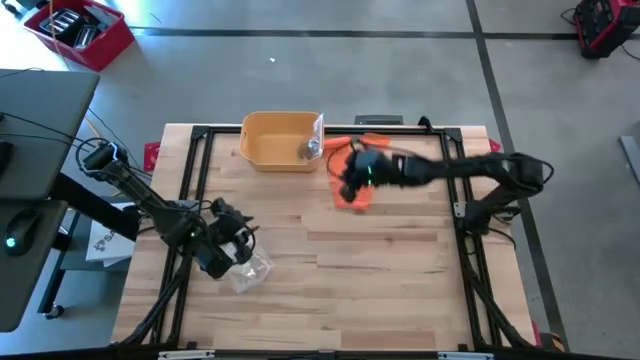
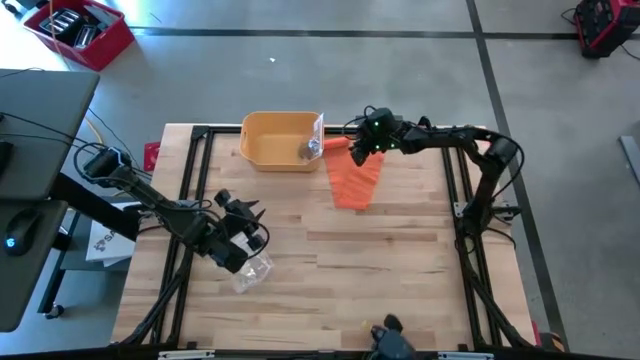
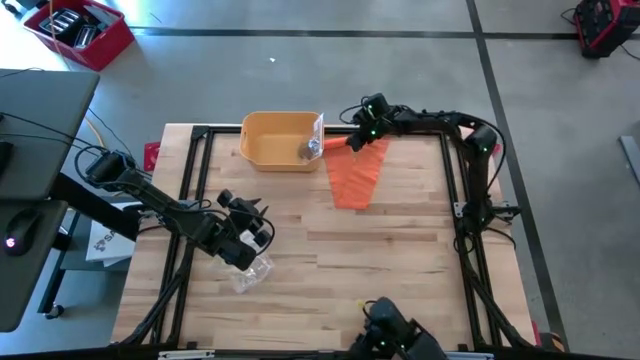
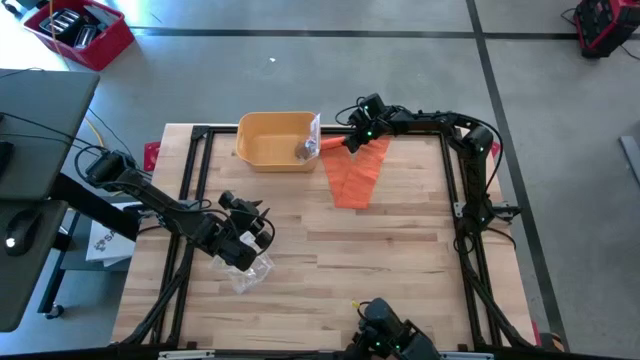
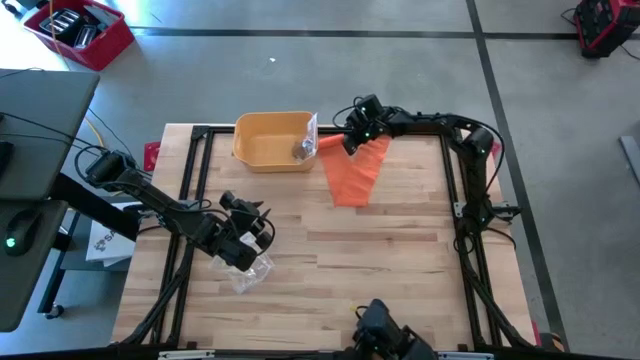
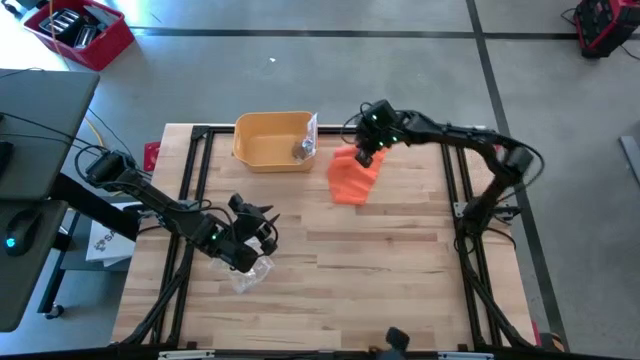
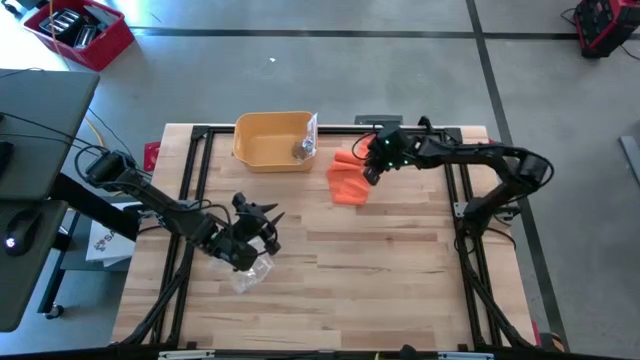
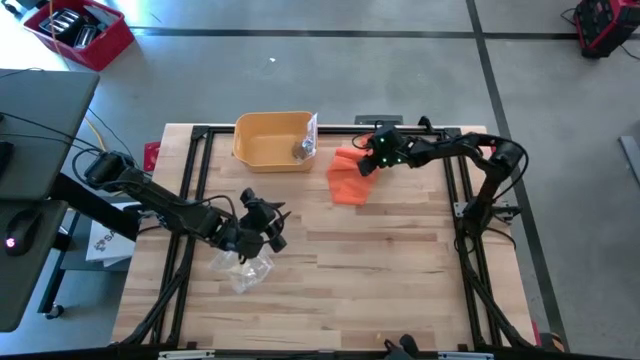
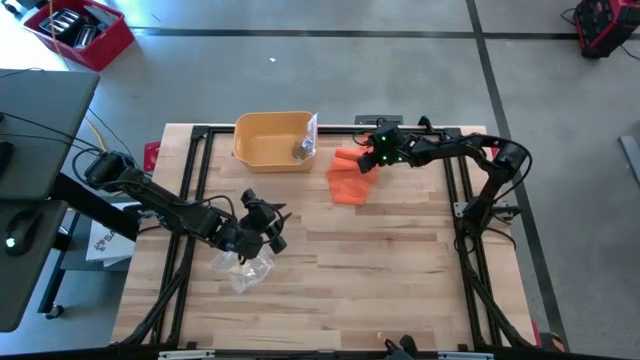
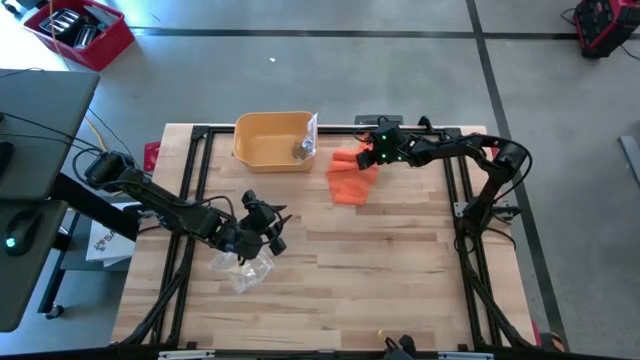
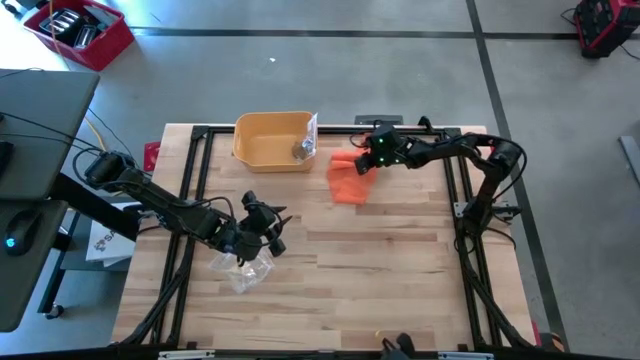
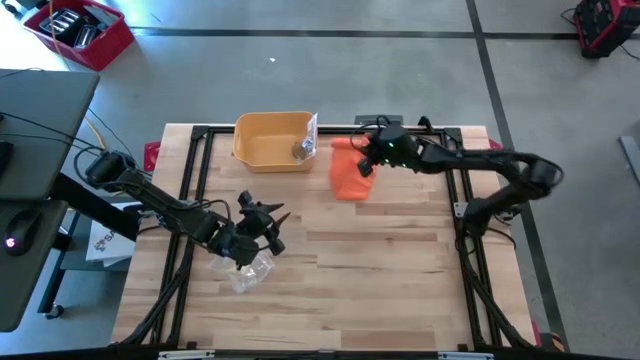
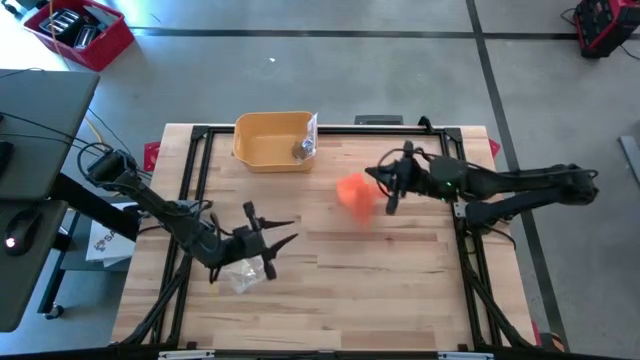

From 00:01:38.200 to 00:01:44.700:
Task: Roll bandage
Roll the orange bandage

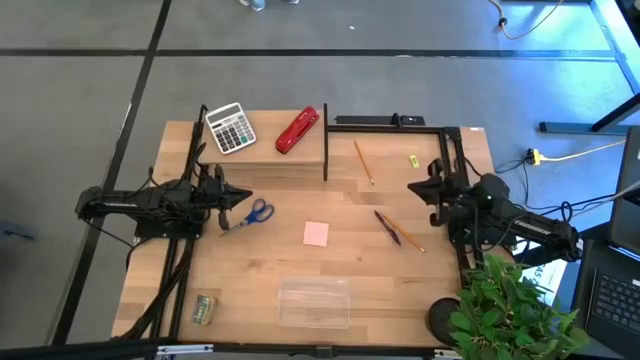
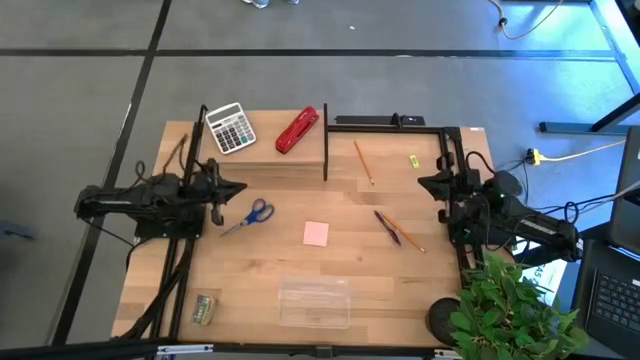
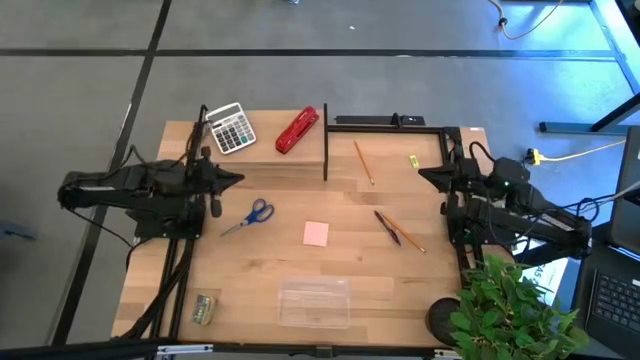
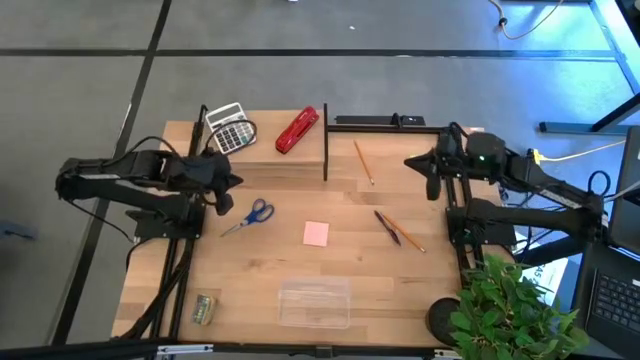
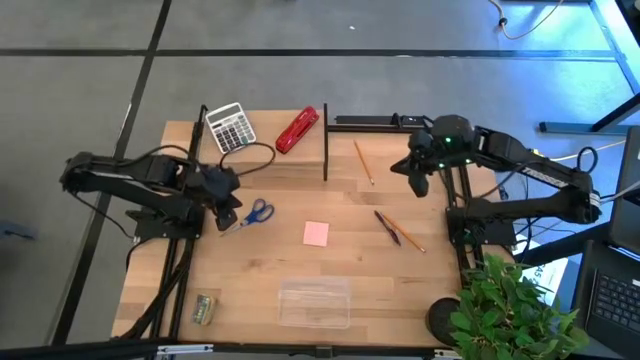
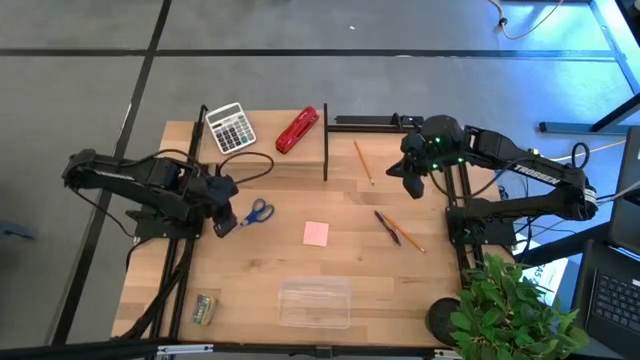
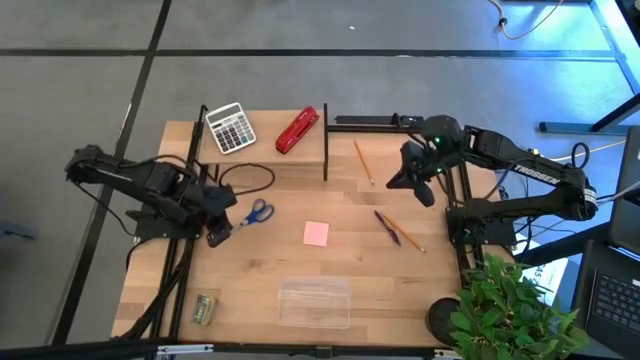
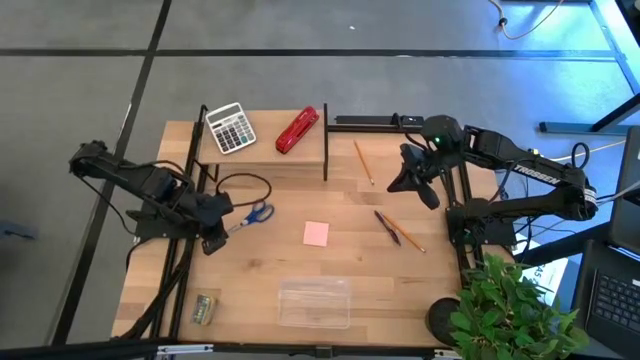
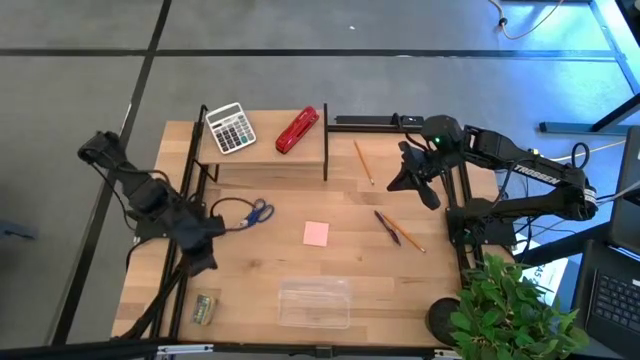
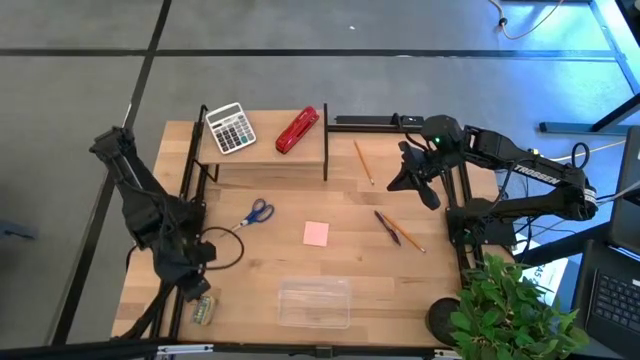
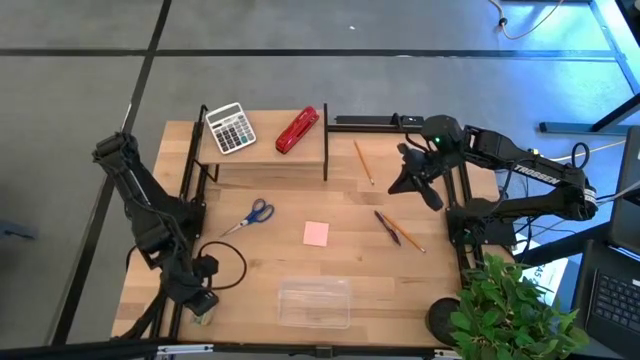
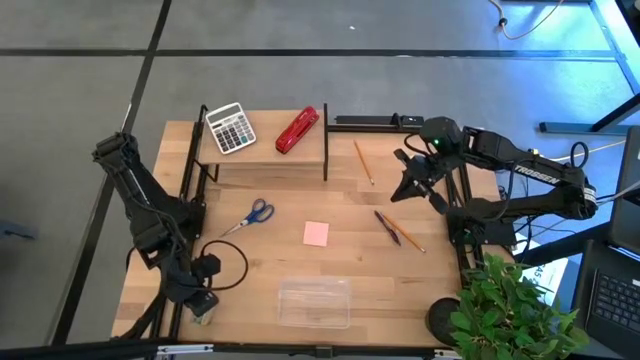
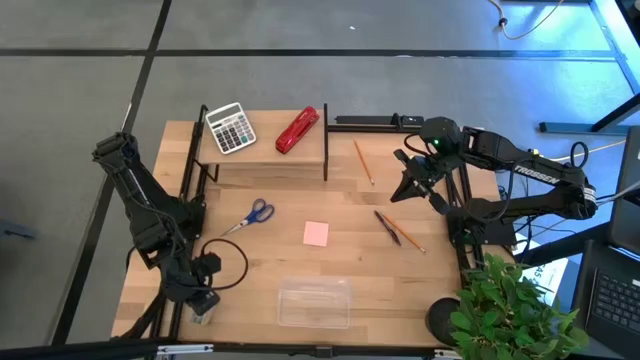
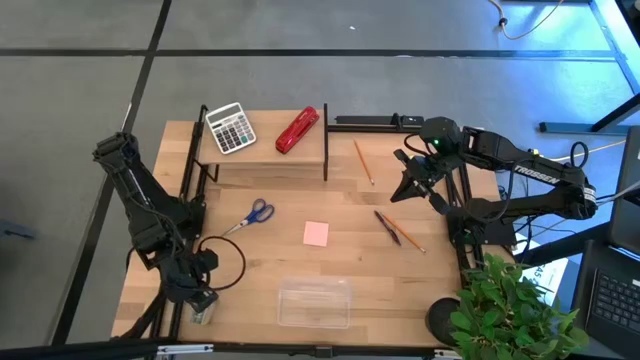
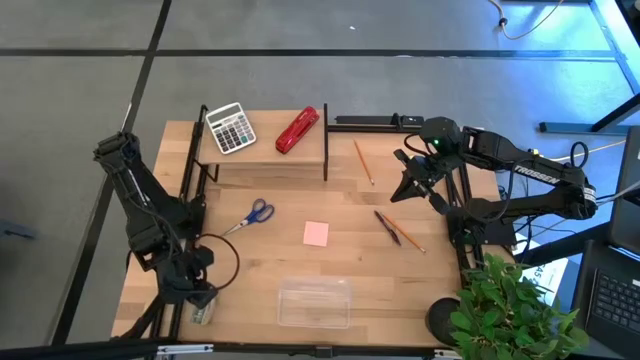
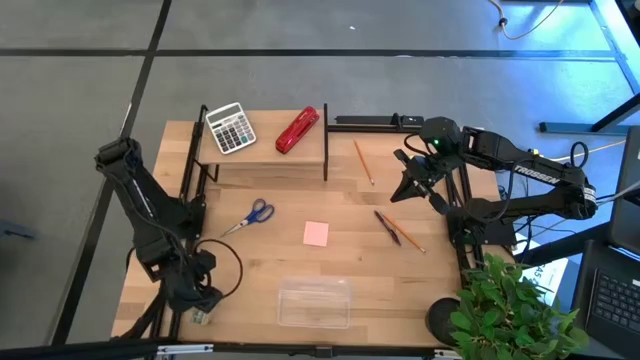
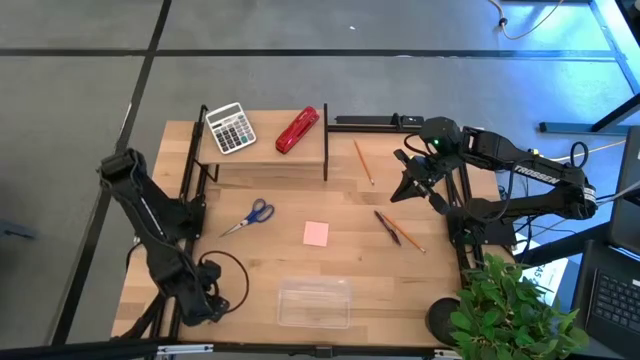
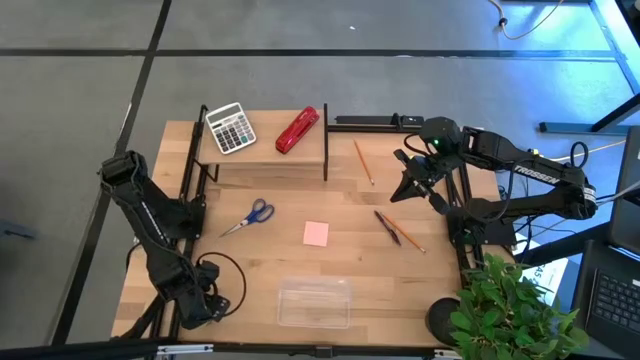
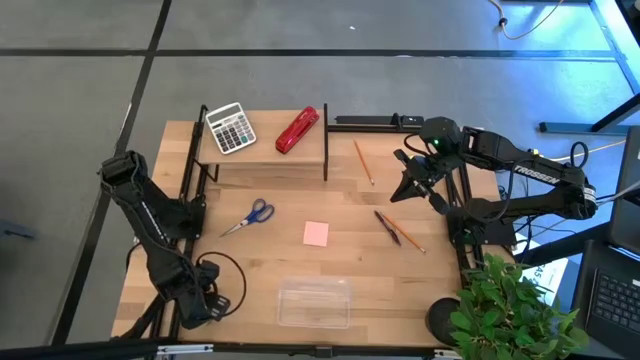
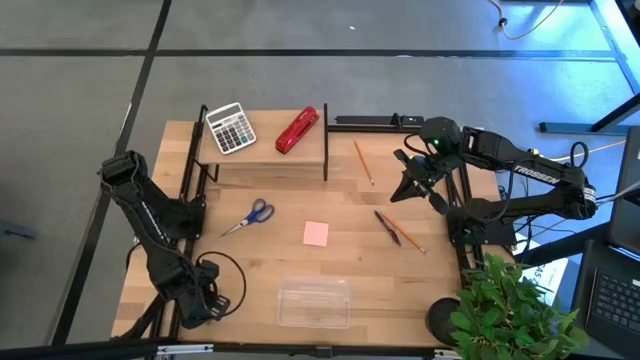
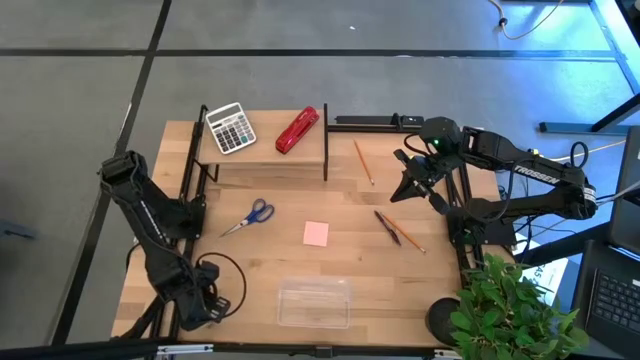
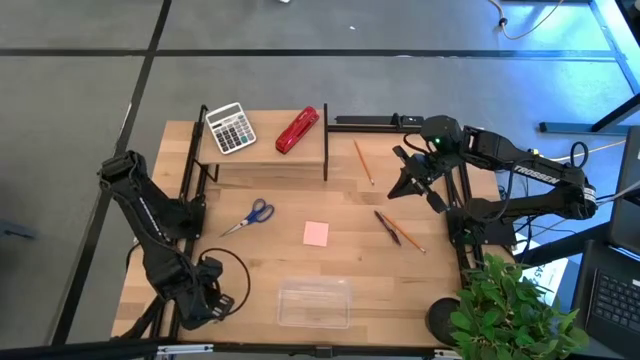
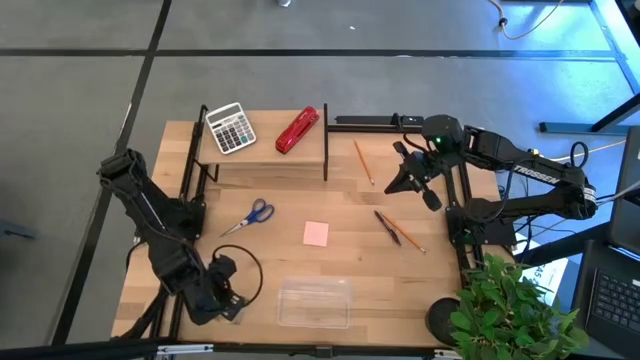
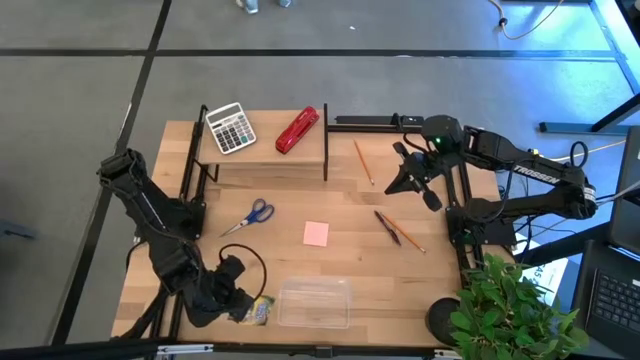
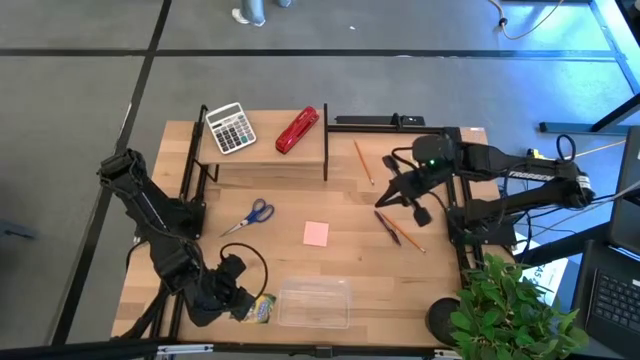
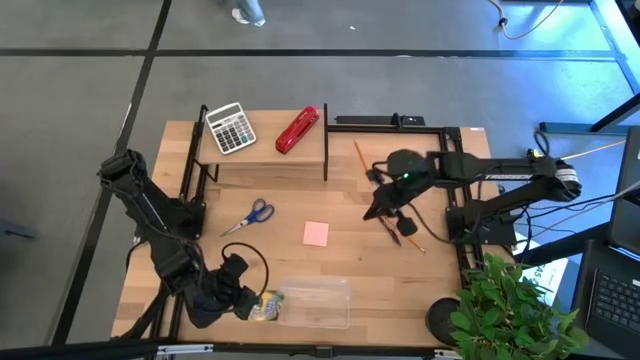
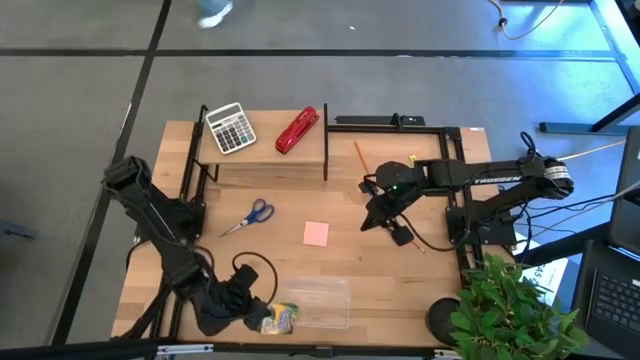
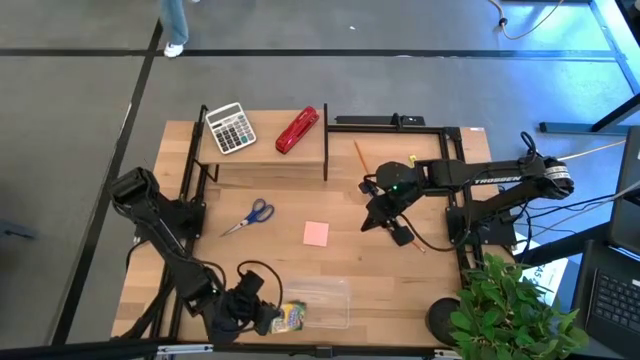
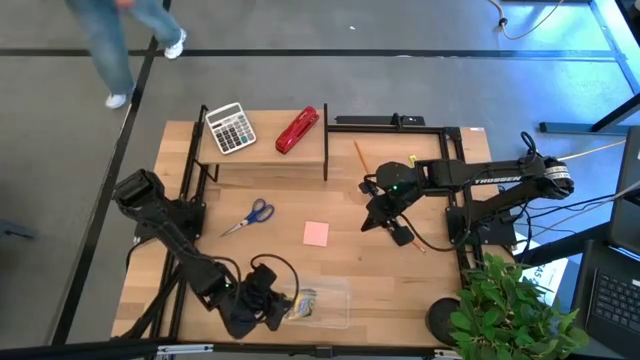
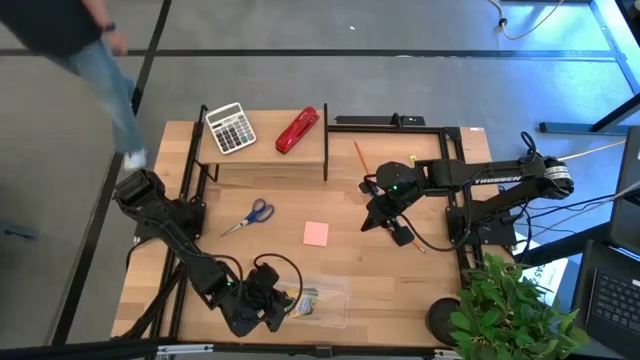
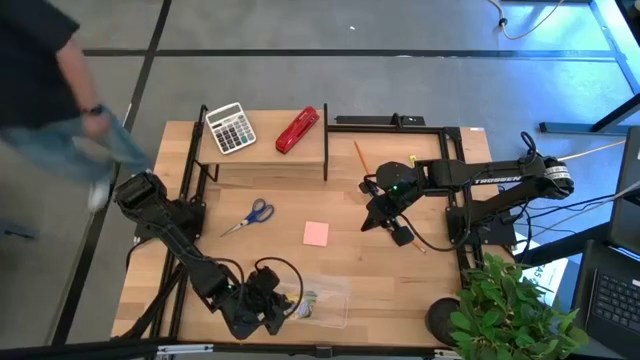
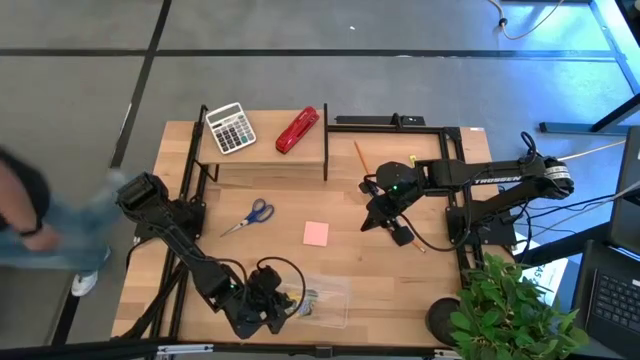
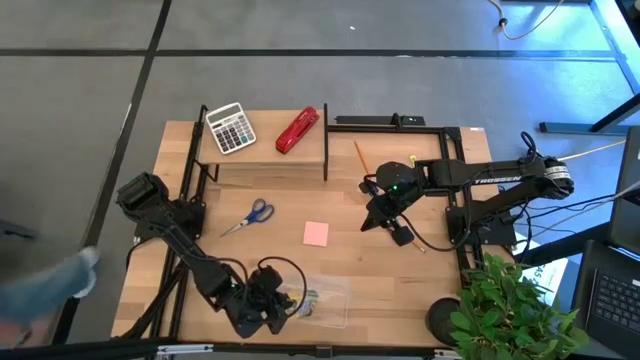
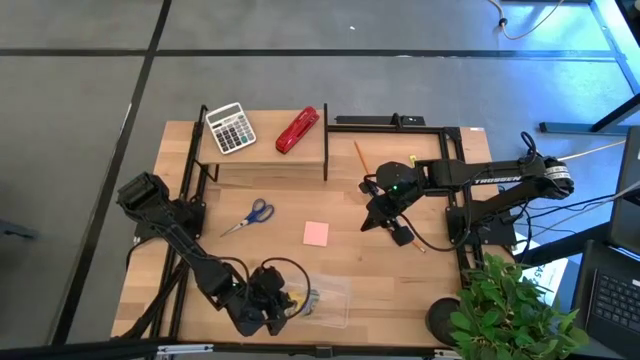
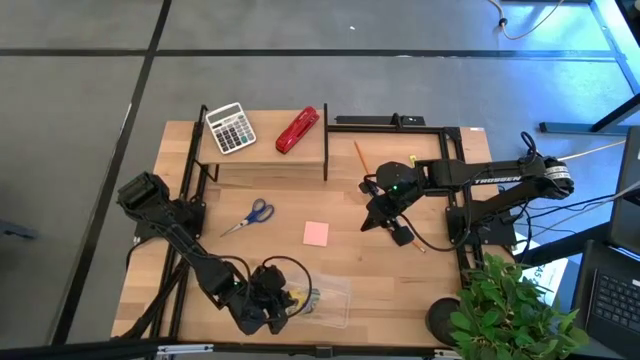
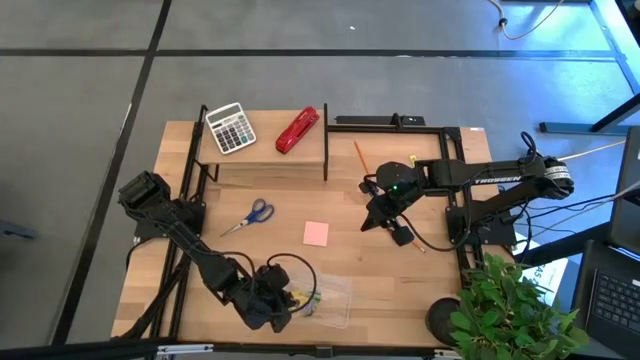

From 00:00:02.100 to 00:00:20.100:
Task: Pack school essentials
Put the crayon box into the transparent supply box
